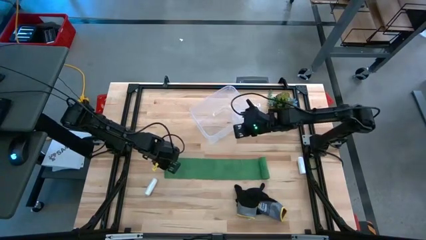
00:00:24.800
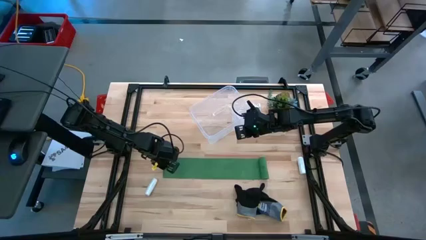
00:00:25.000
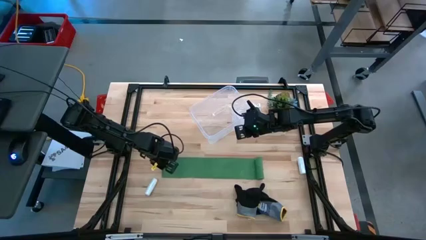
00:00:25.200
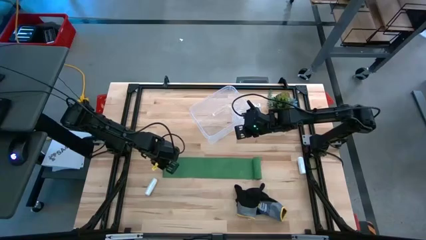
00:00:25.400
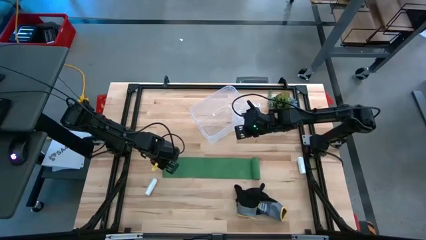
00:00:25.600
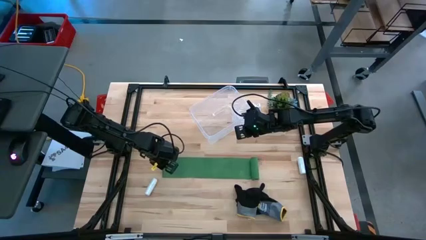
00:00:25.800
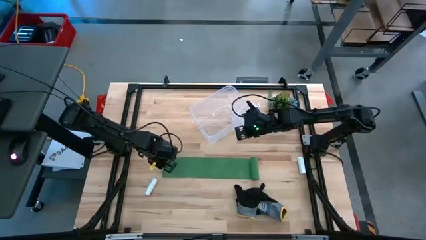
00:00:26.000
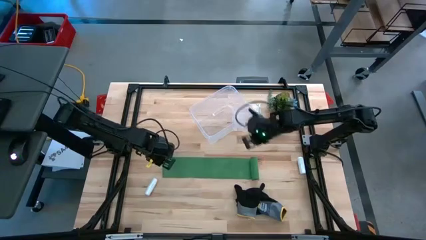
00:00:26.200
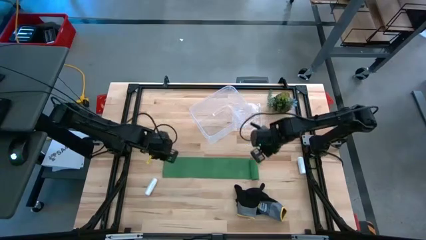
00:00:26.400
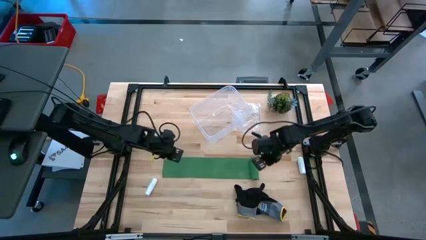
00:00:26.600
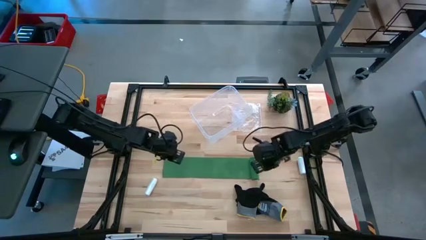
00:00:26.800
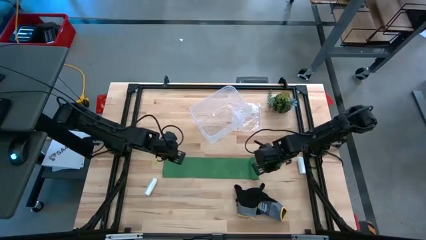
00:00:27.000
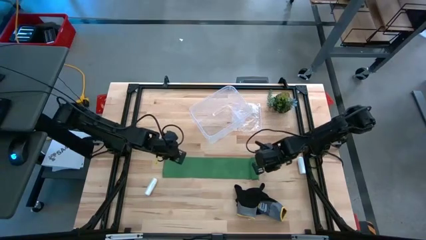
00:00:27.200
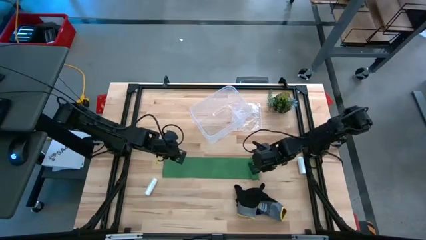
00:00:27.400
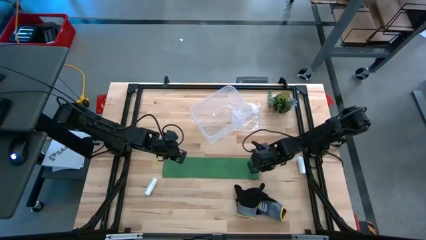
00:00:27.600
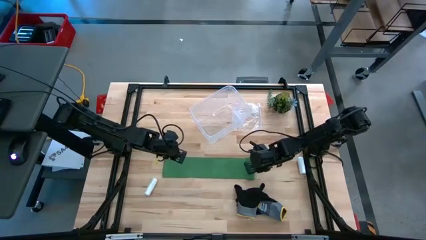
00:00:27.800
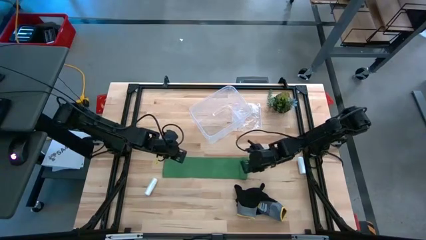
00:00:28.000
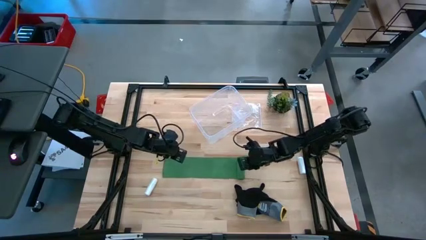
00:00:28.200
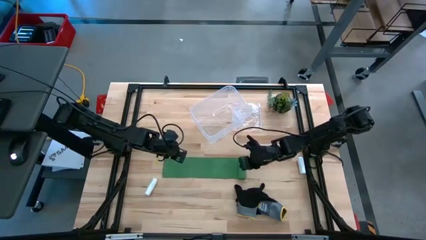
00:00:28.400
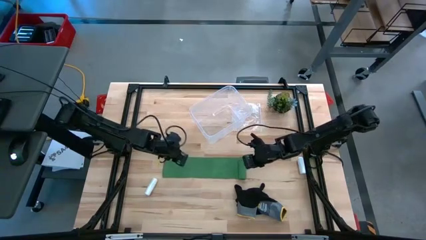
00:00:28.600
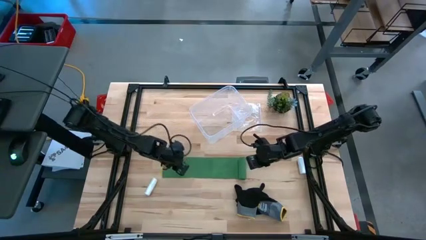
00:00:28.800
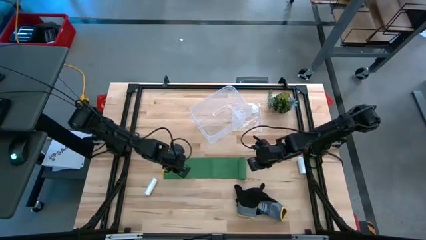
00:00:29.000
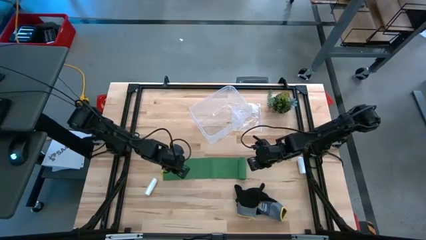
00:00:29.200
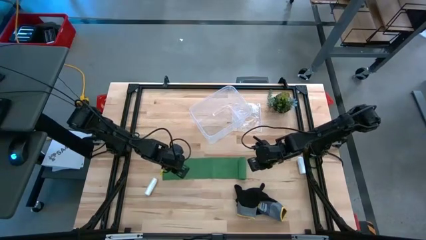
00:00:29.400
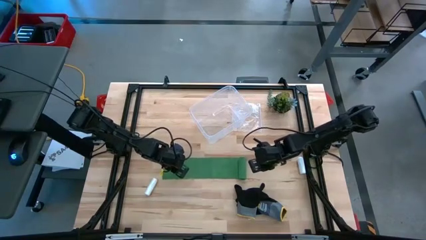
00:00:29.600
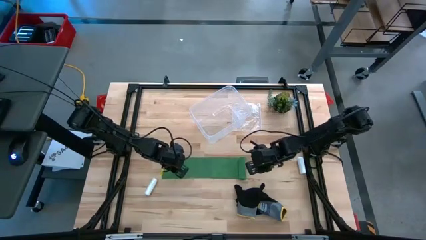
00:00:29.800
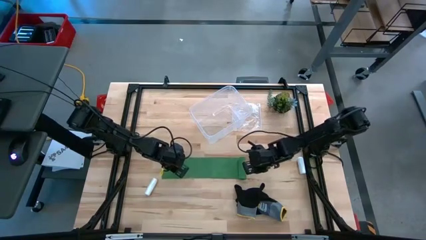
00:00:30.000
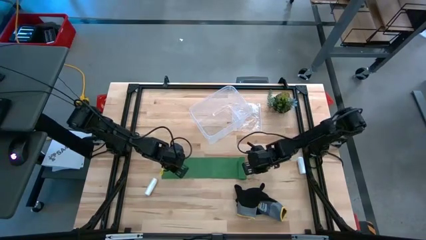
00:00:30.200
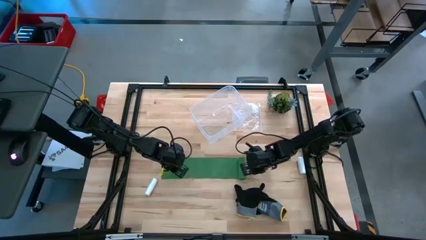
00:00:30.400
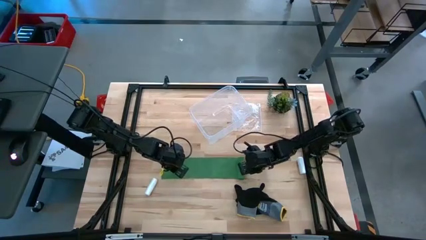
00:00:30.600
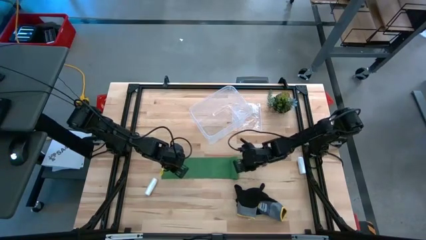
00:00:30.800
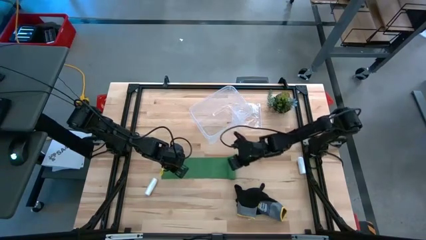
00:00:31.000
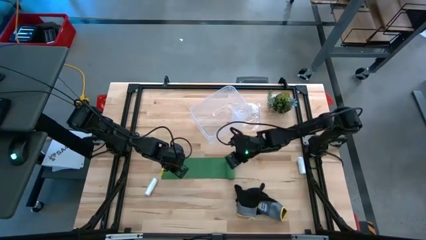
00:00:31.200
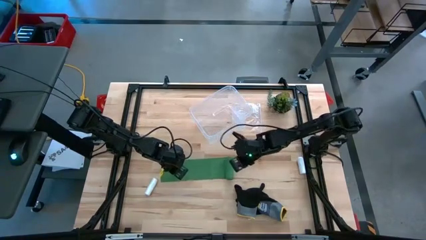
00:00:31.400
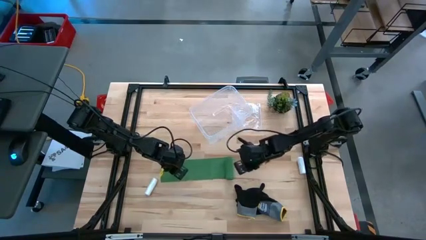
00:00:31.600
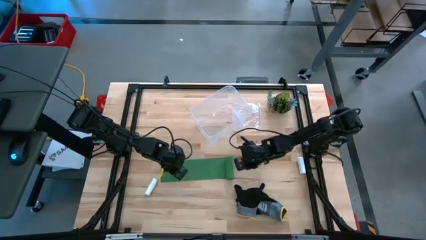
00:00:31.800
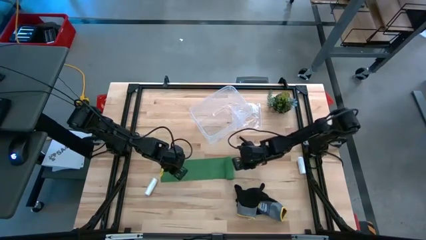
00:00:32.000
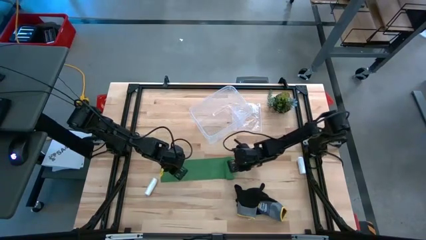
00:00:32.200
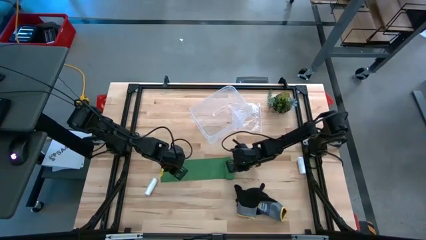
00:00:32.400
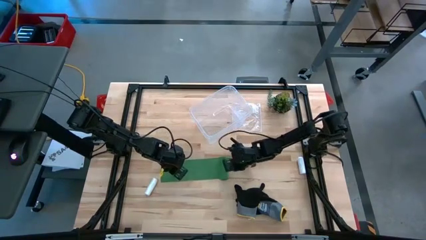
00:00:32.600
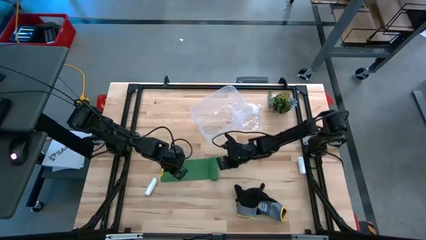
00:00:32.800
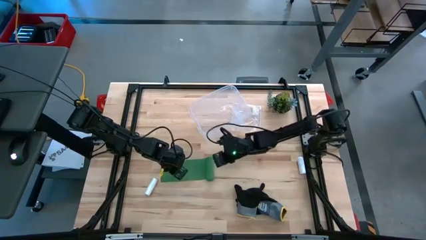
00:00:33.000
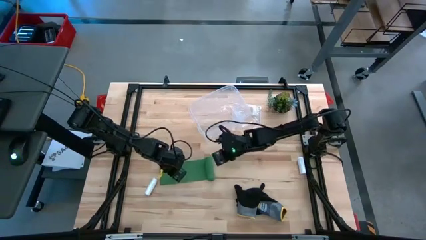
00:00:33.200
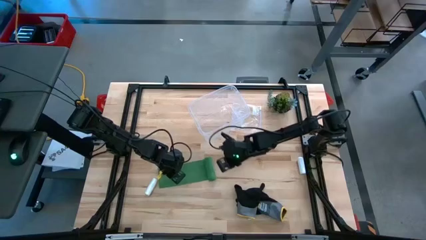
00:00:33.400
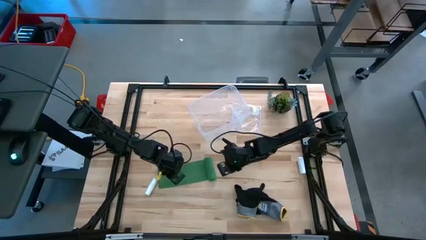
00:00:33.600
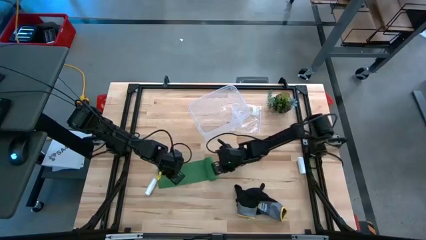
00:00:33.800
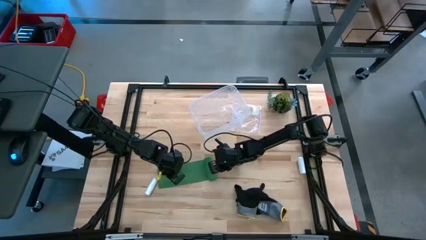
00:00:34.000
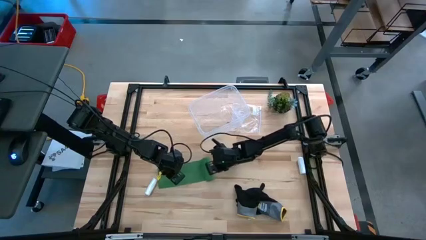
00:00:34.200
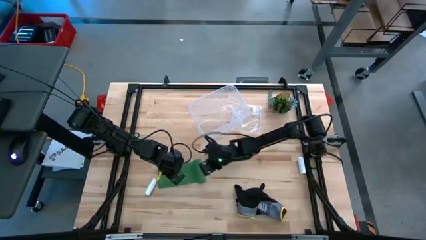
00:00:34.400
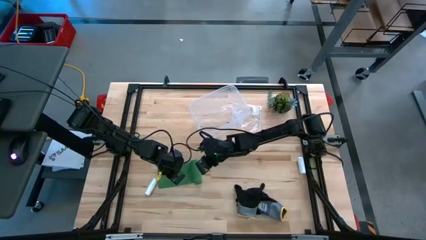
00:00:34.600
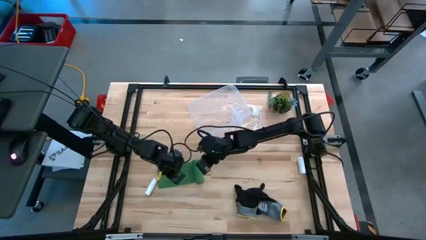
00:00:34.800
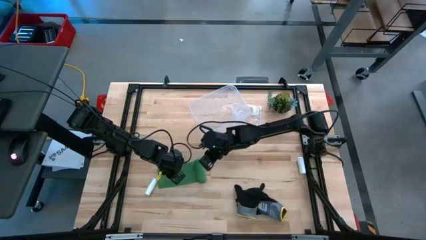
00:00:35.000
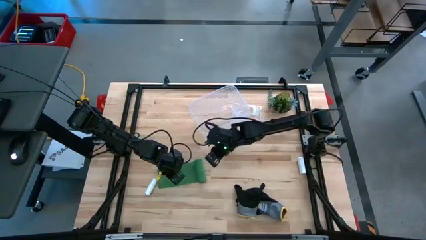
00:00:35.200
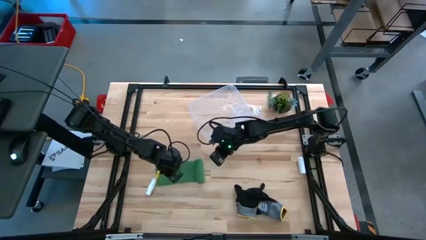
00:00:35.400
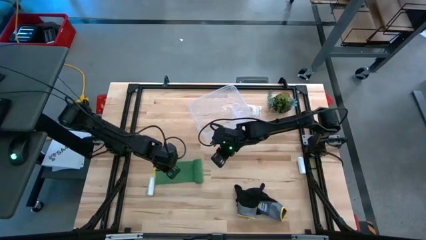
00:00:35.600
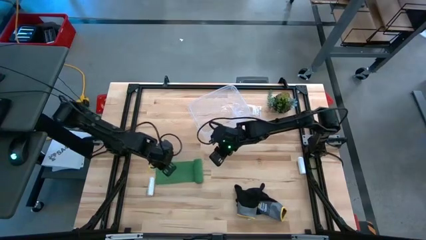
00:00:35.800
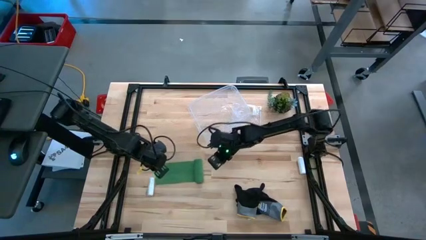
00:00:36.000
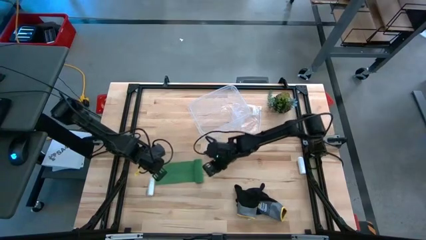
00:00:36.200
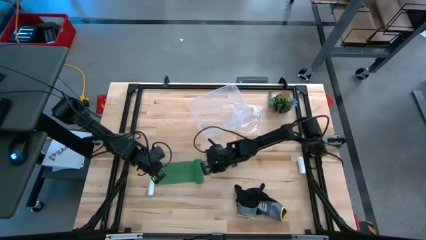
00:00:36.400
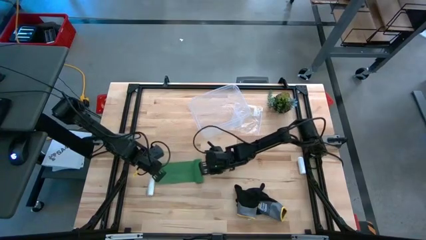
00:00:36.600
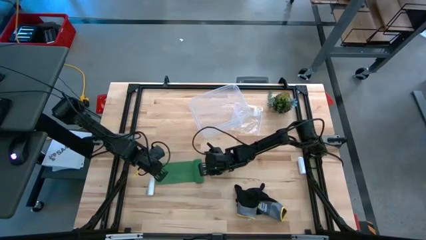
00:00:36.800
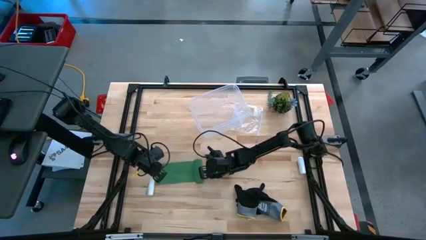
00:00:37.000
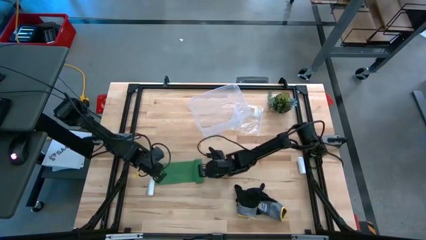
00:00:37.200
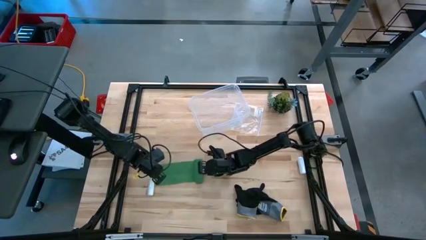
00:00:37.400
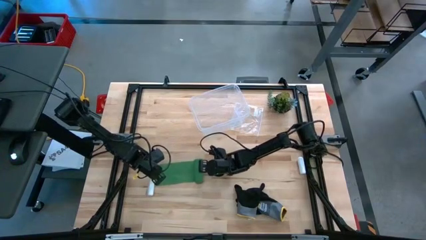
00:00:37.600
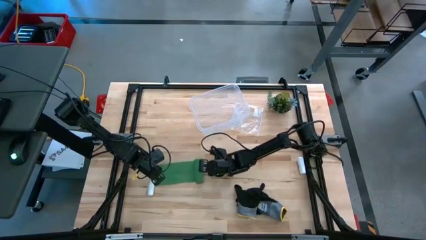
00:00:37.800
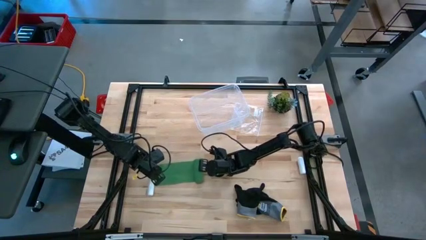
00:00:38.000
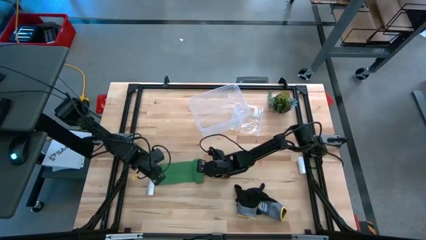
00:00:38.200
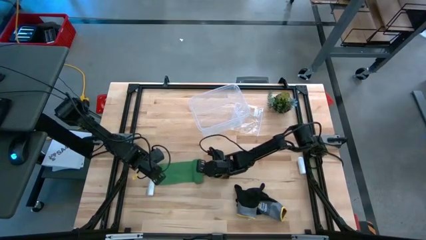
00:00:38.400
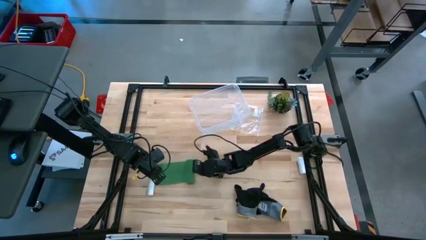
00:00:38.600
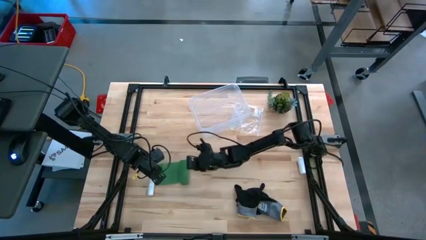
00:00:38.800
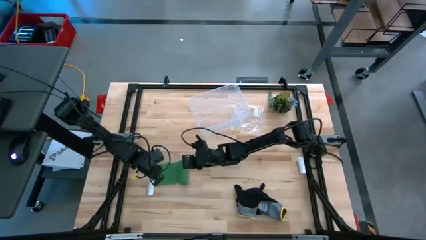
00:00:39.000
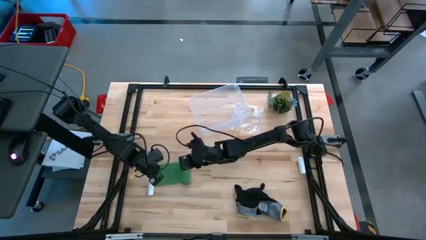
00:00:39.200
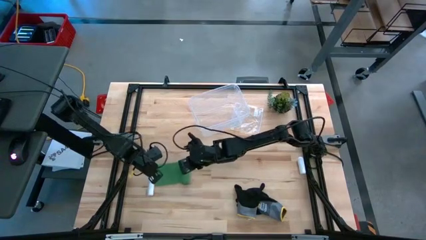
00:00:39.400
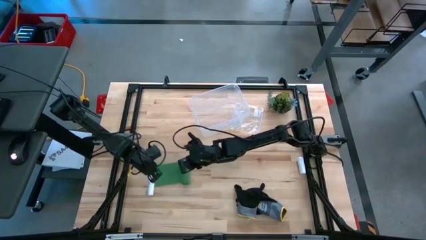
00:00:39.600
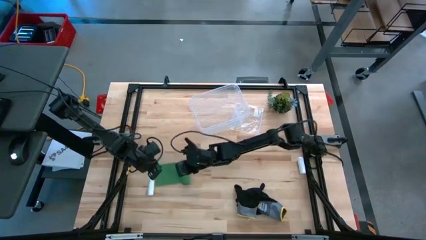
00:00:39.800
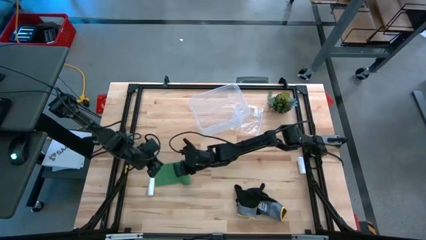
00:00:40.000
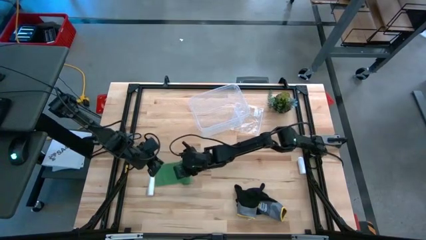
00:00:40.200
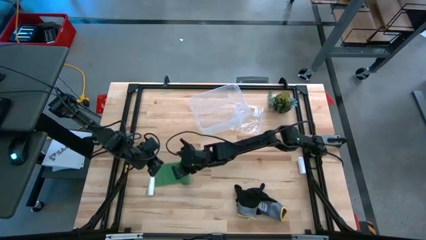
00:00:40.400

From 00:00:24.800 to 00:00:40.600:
Task: Roll bandage
Roll the green bandage
